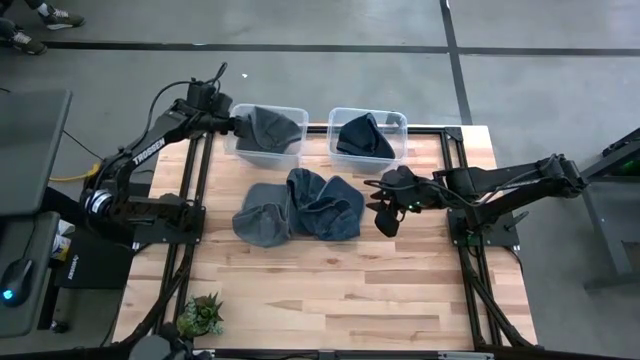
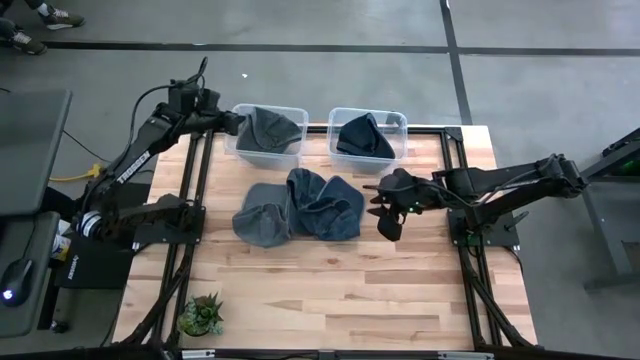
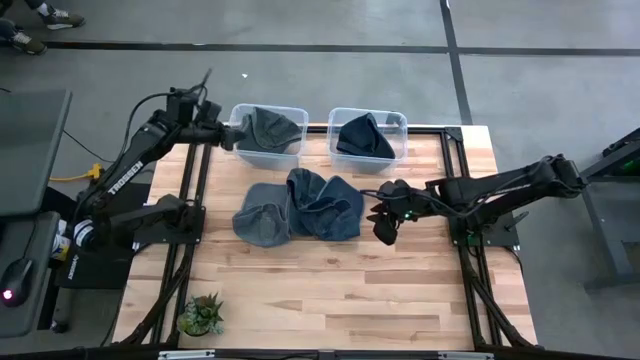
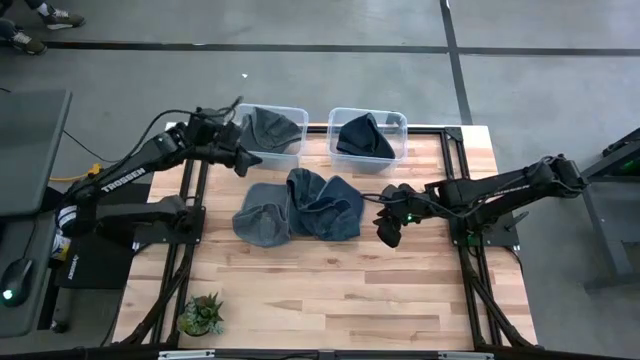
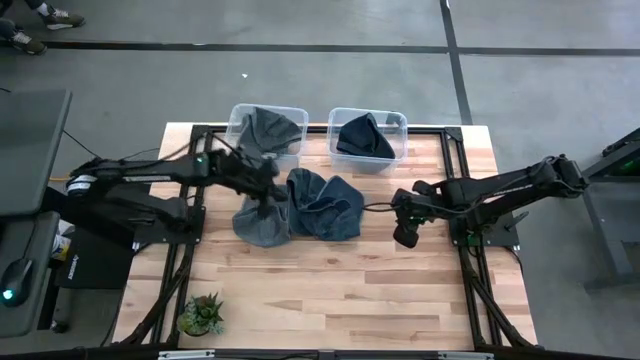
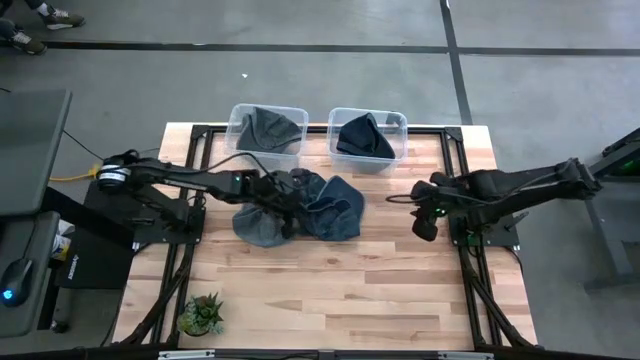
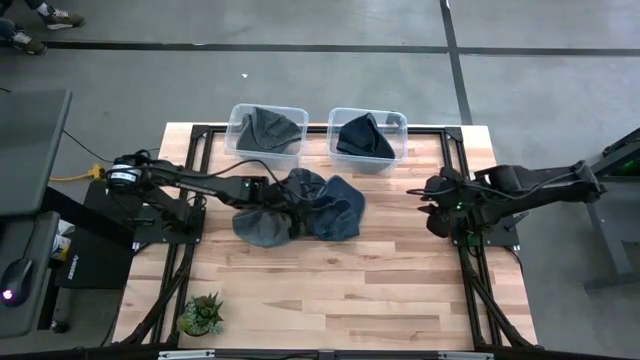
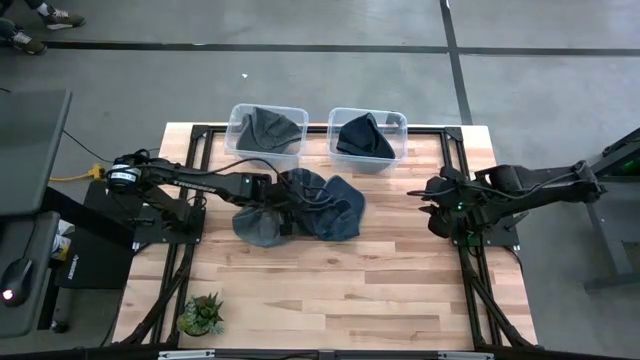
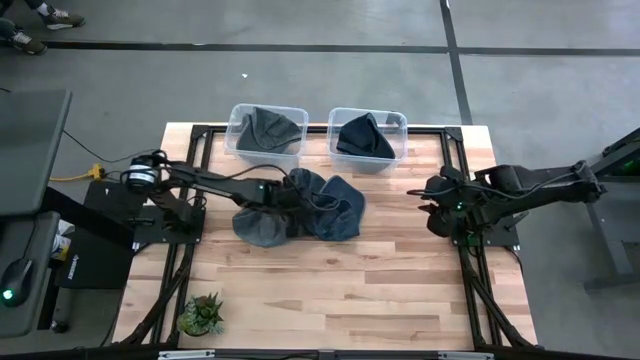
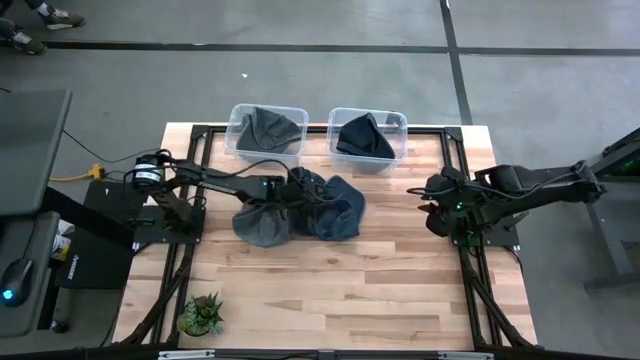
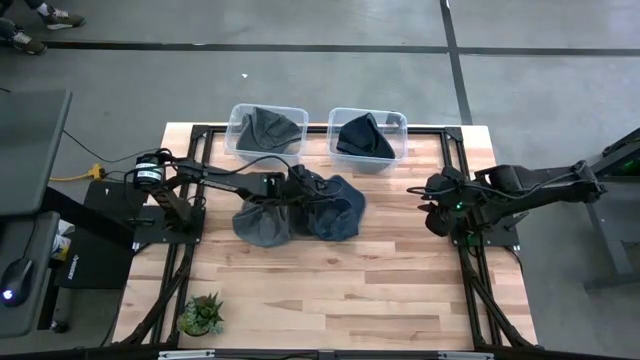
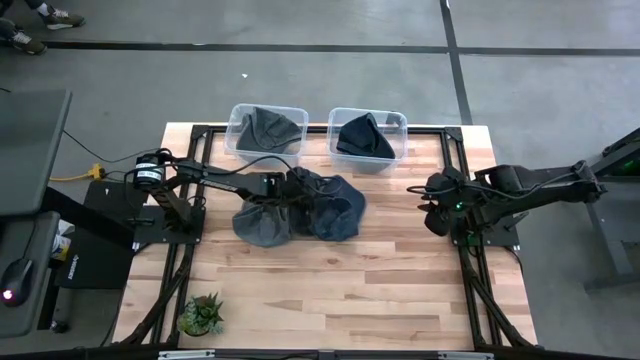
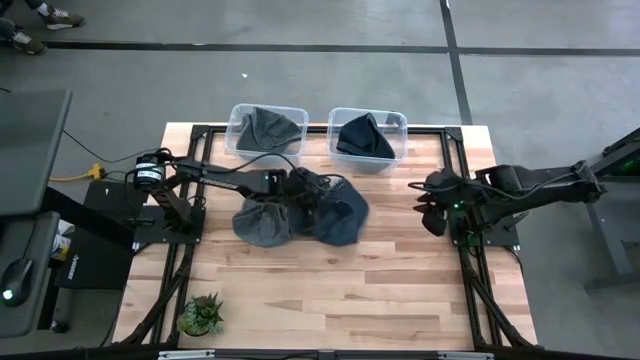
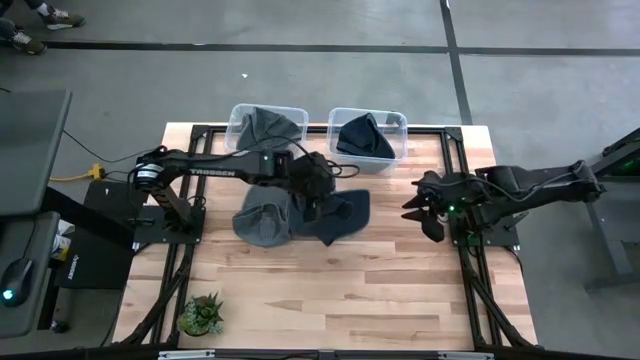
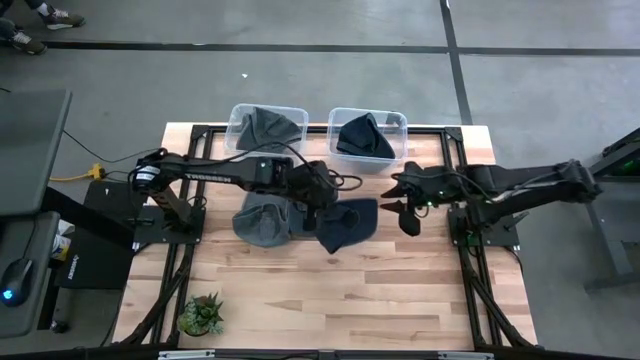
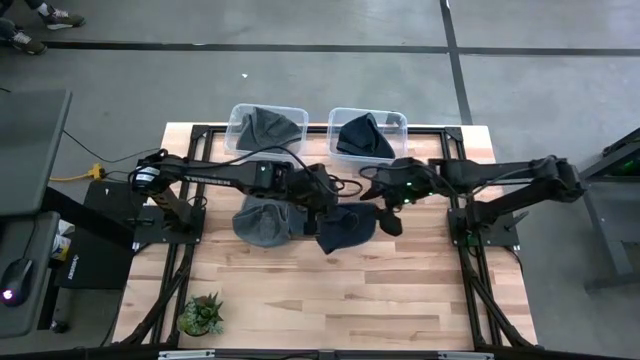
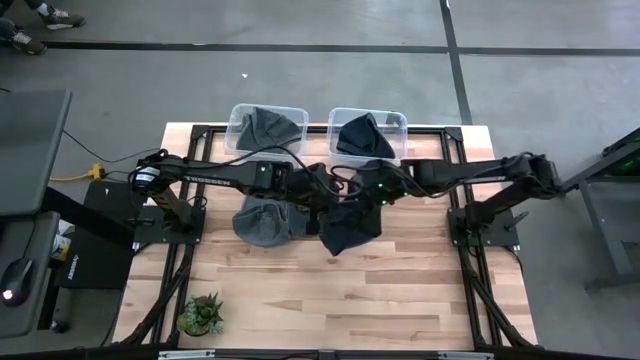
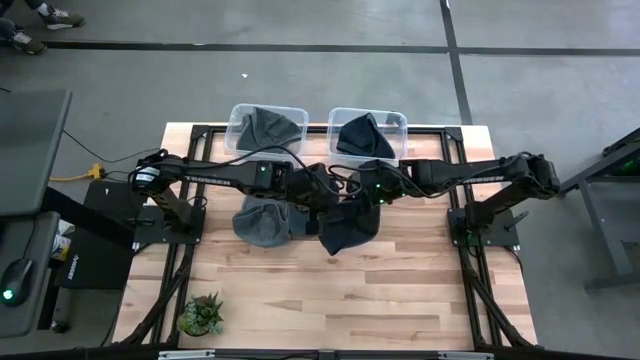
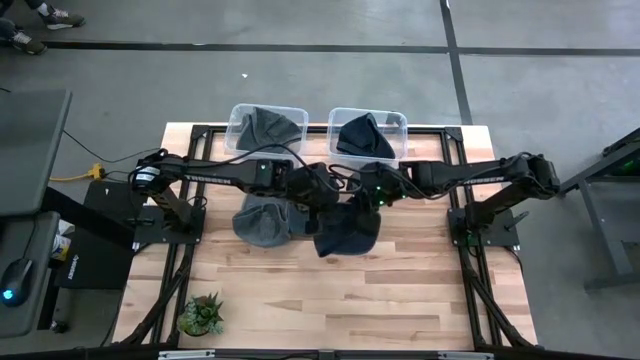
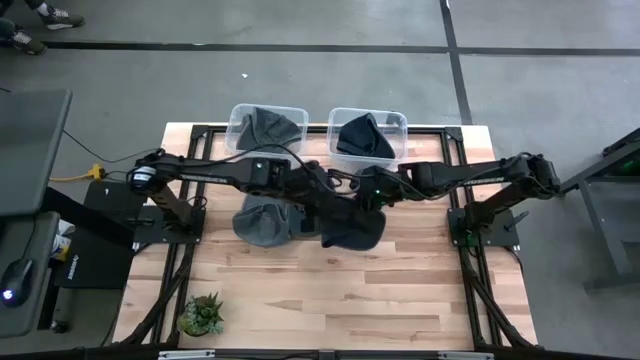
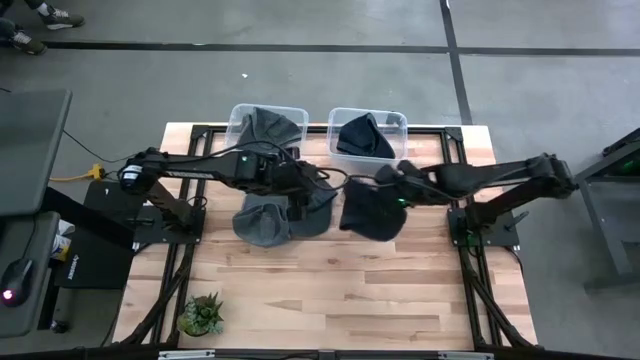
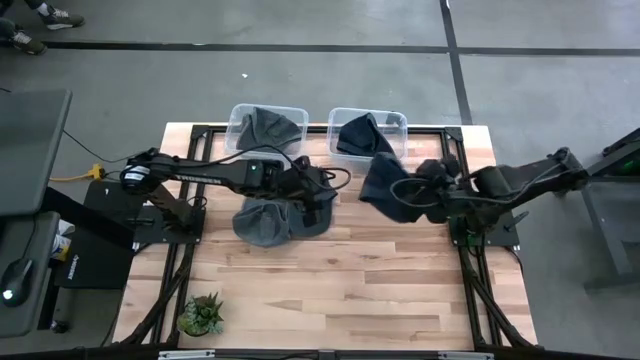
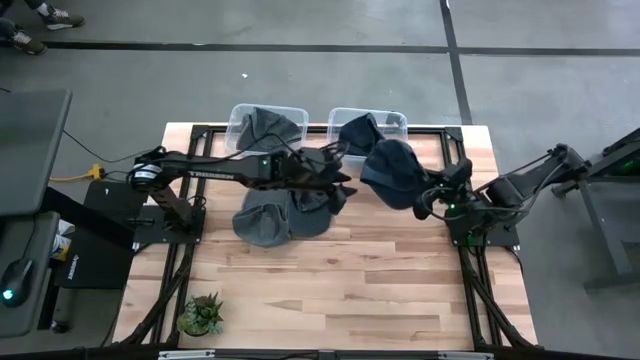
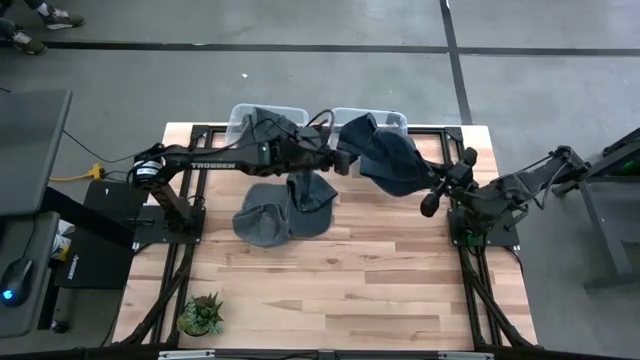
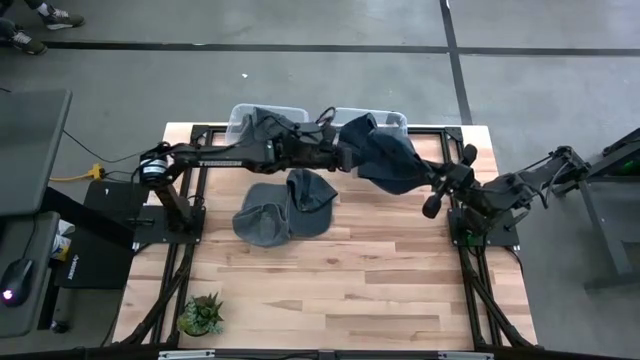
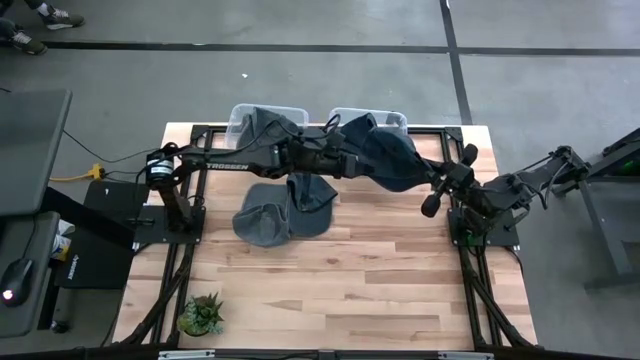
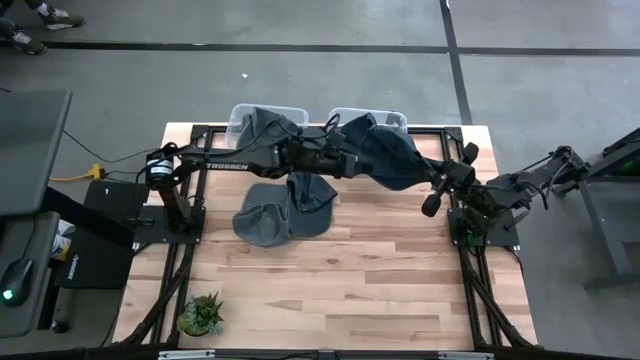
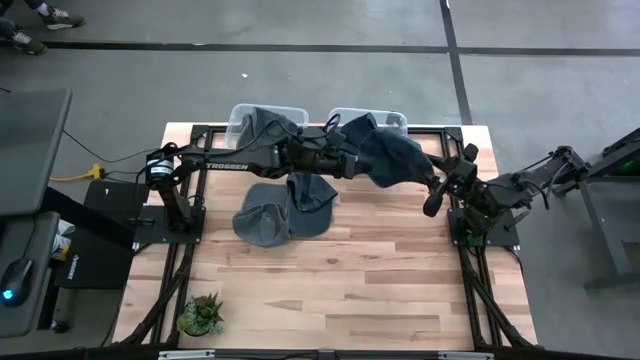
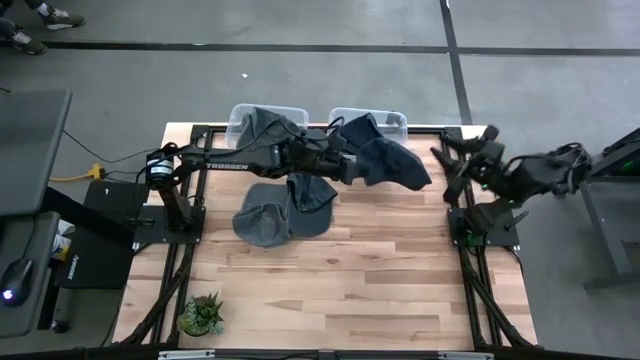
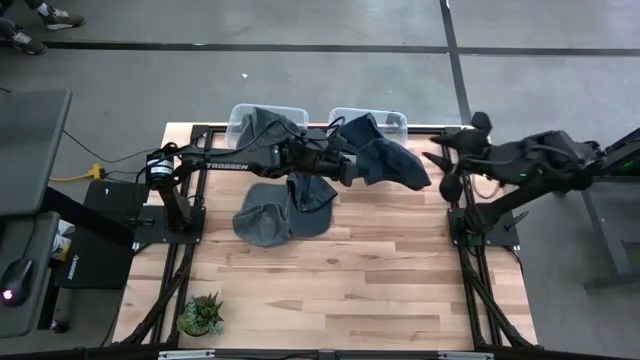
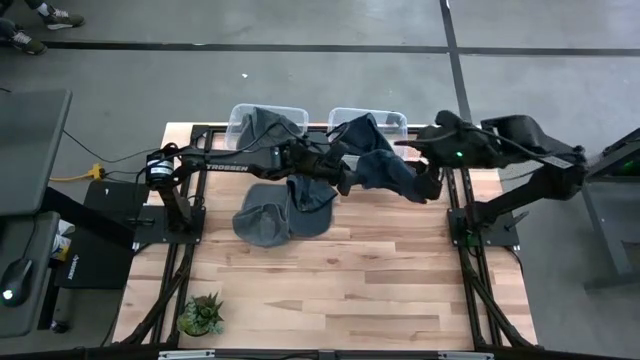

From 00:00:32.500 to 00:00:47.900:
Task: Pick & Place hat
Put the right black cap into the right transparent bin

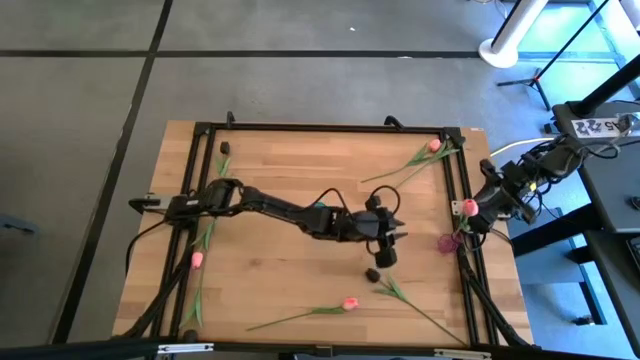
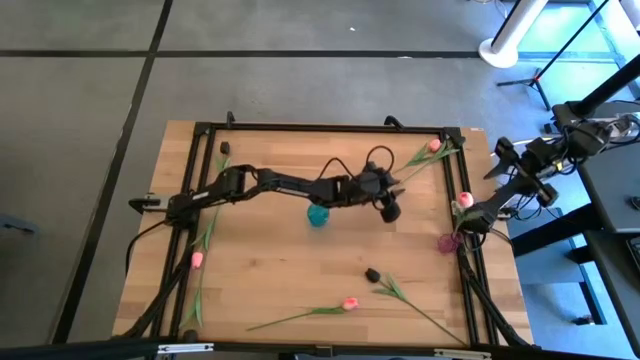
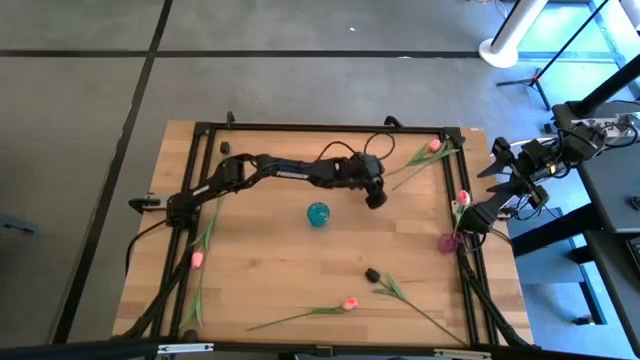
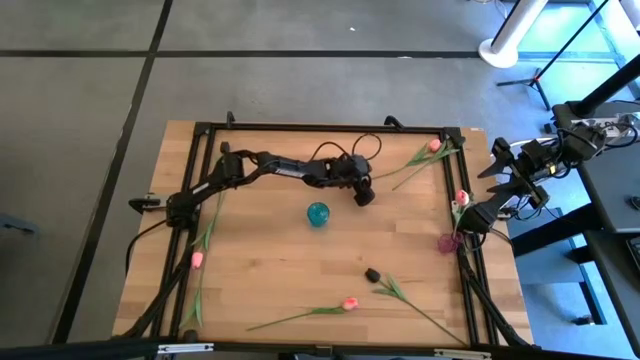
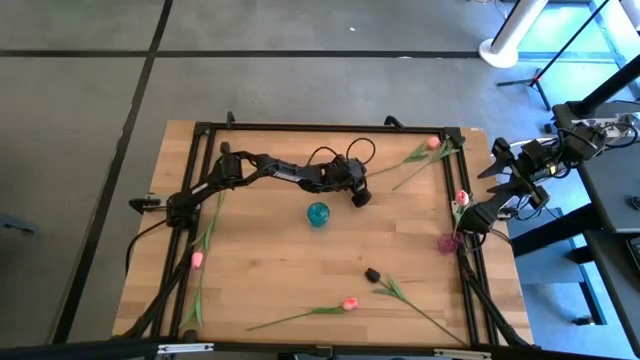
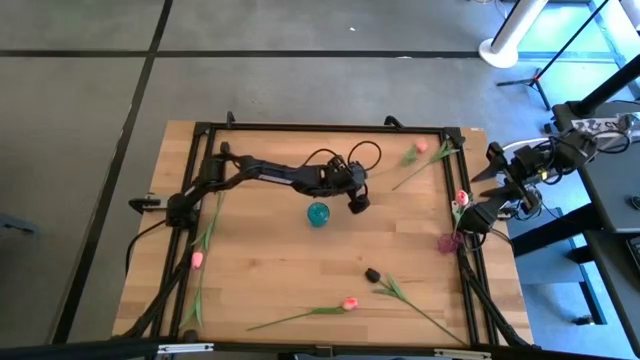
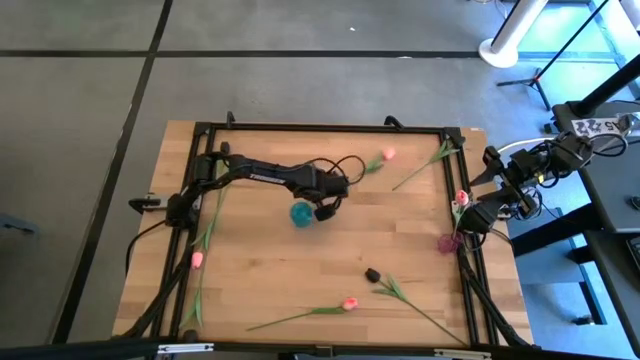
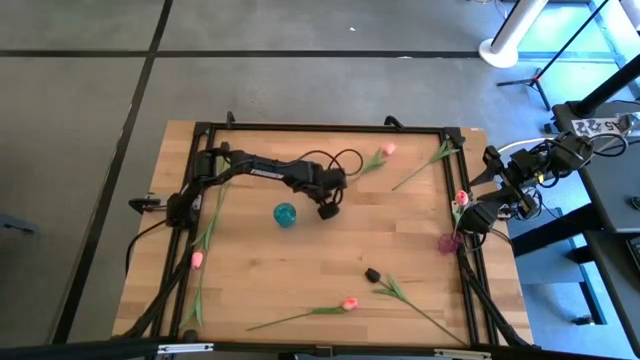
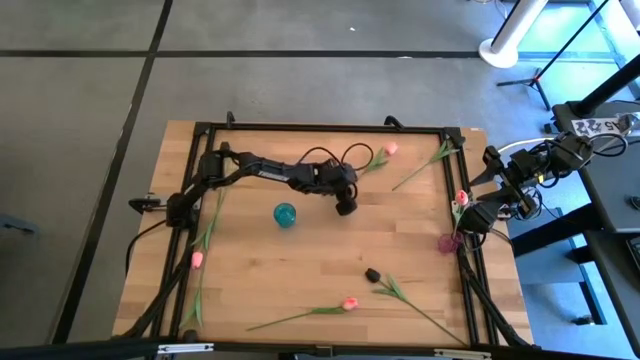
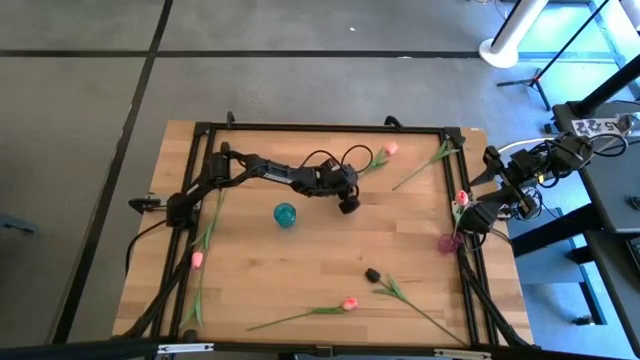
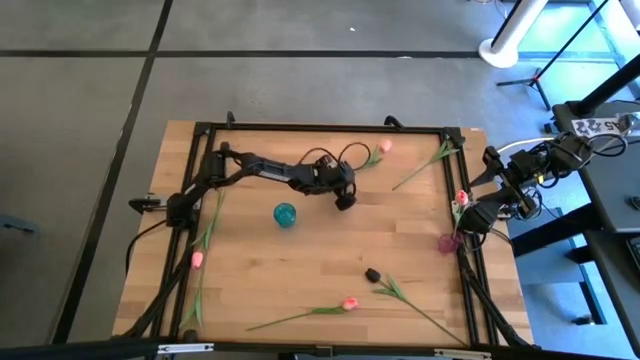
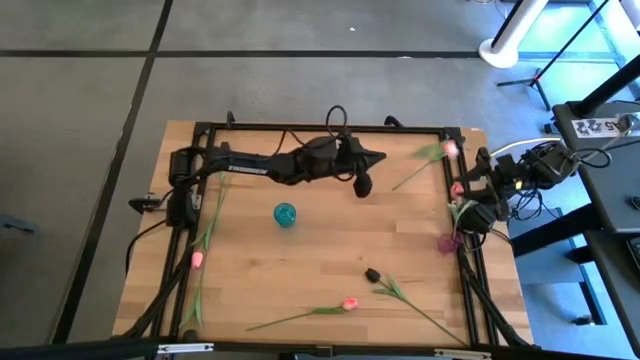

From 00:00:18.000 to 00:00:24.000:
Task: Sort flowers into vase by color
Put the pink tulip into the purple vase
